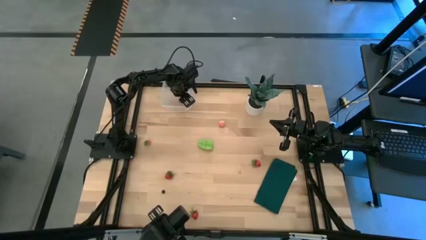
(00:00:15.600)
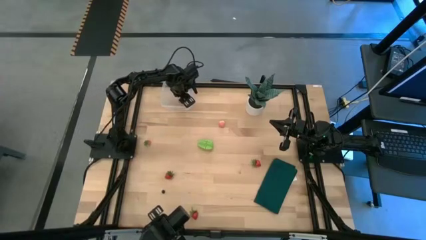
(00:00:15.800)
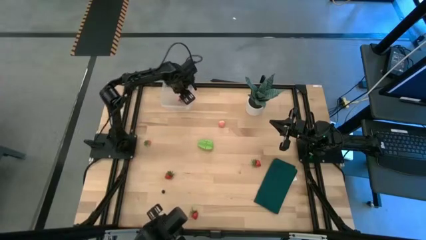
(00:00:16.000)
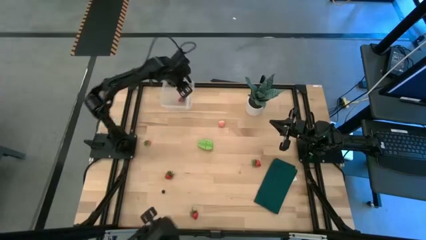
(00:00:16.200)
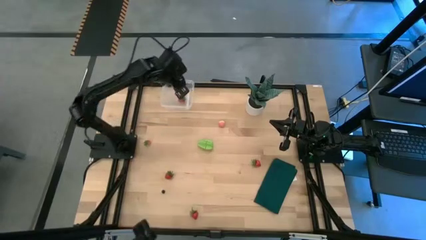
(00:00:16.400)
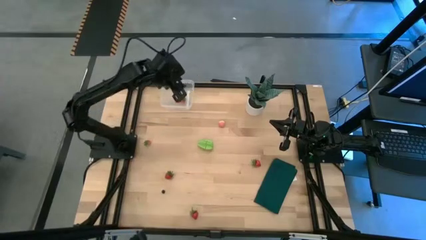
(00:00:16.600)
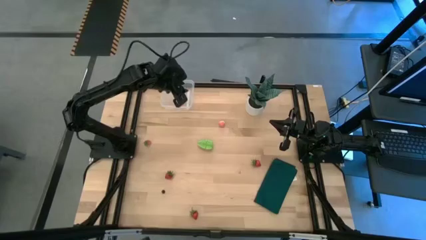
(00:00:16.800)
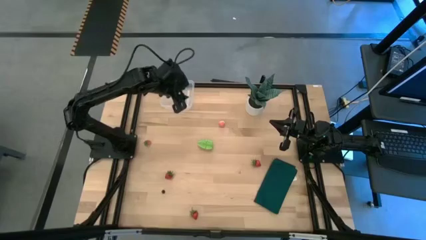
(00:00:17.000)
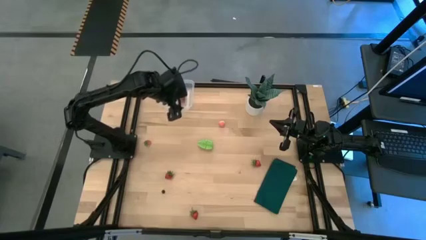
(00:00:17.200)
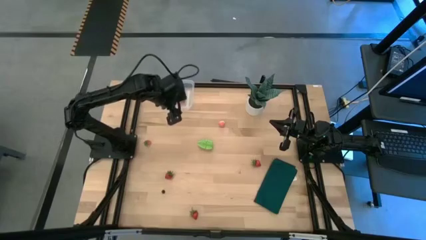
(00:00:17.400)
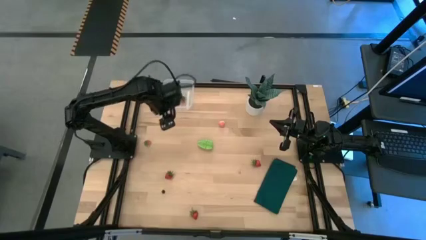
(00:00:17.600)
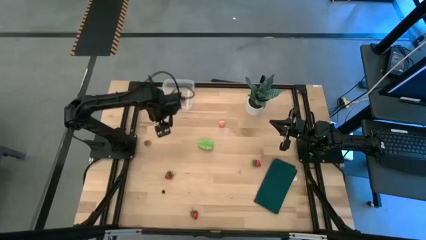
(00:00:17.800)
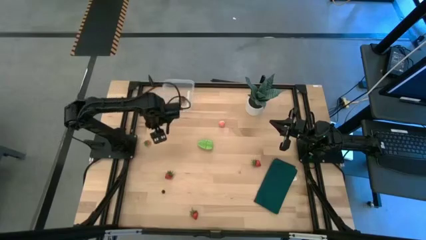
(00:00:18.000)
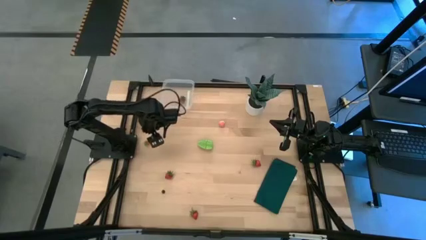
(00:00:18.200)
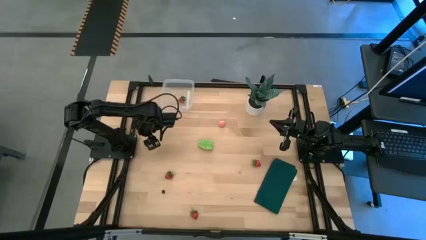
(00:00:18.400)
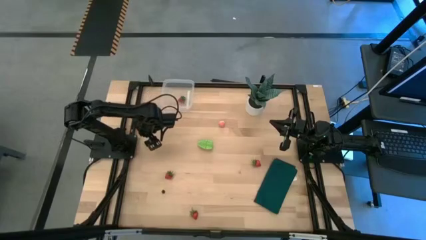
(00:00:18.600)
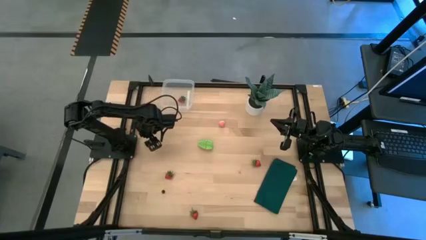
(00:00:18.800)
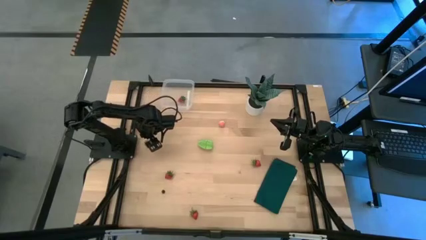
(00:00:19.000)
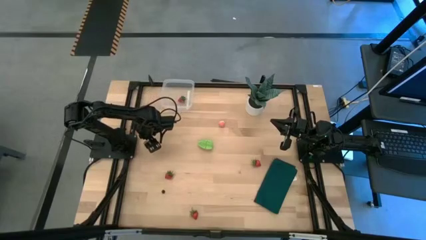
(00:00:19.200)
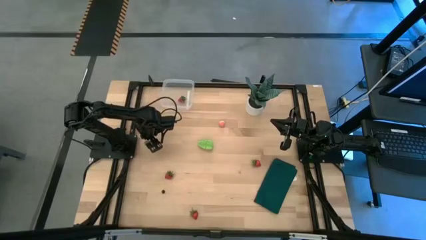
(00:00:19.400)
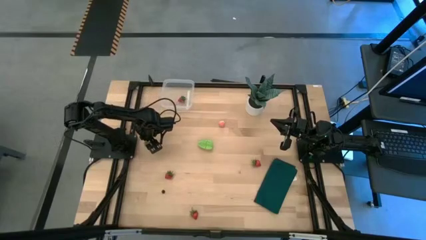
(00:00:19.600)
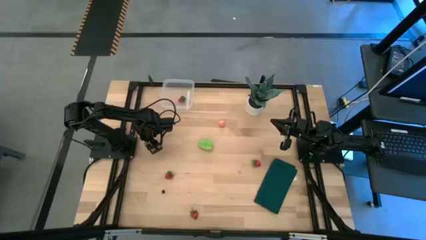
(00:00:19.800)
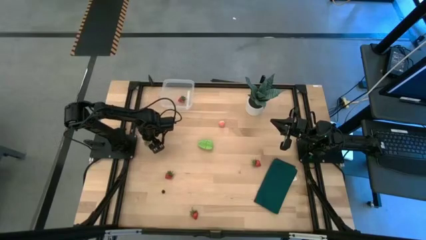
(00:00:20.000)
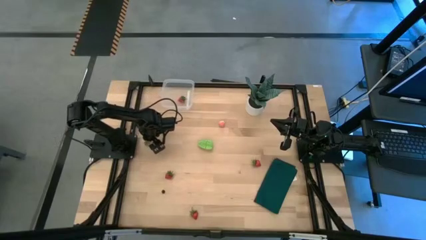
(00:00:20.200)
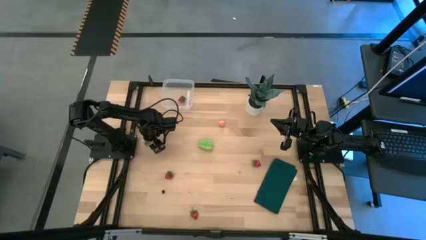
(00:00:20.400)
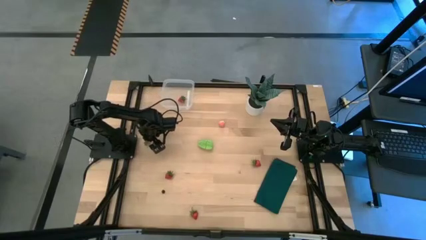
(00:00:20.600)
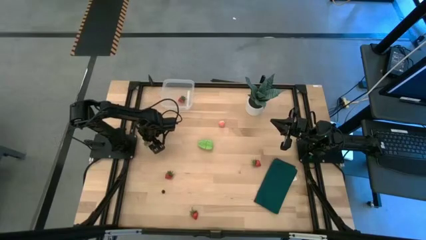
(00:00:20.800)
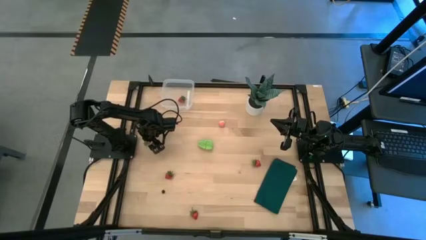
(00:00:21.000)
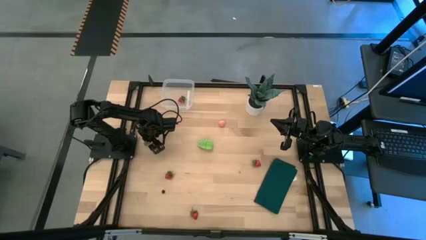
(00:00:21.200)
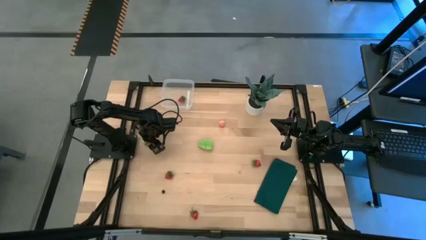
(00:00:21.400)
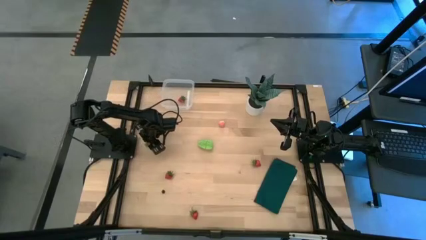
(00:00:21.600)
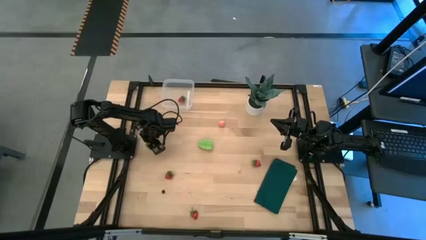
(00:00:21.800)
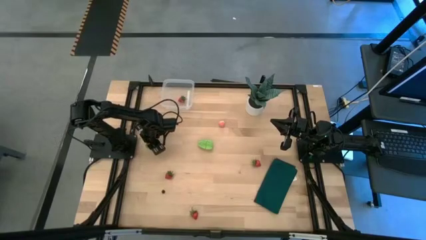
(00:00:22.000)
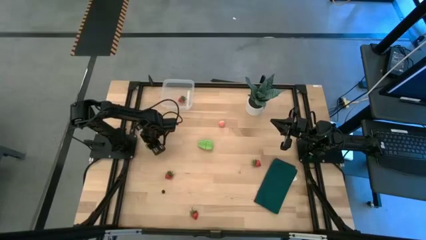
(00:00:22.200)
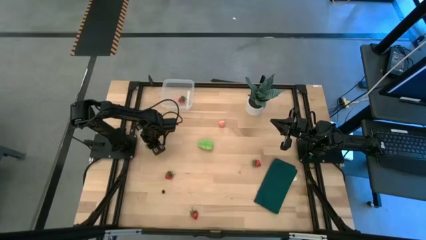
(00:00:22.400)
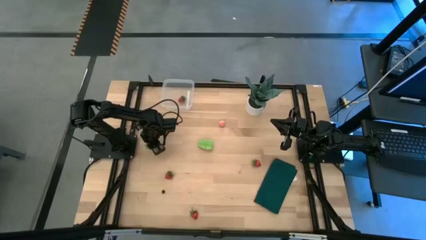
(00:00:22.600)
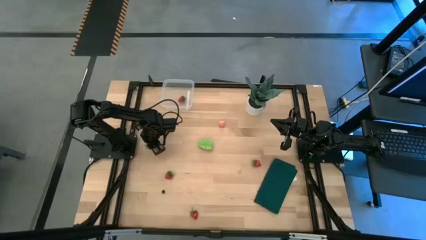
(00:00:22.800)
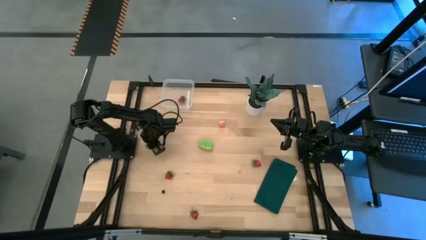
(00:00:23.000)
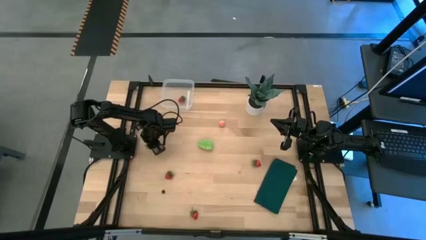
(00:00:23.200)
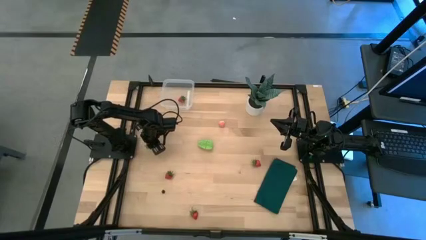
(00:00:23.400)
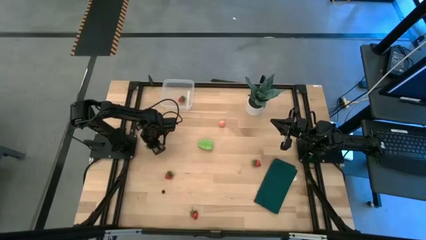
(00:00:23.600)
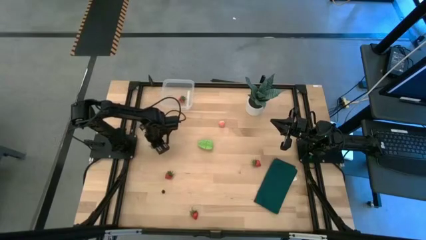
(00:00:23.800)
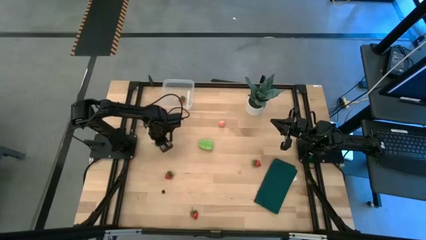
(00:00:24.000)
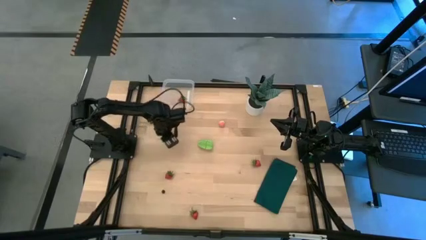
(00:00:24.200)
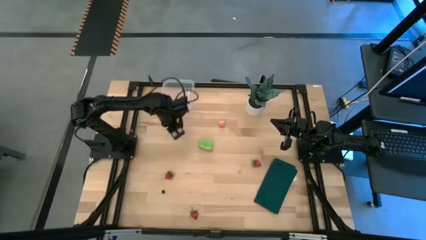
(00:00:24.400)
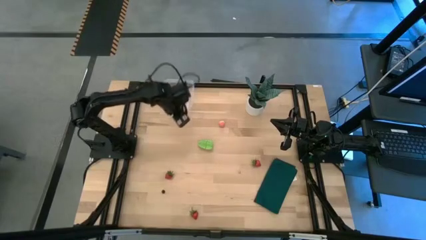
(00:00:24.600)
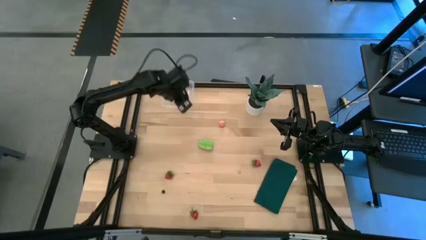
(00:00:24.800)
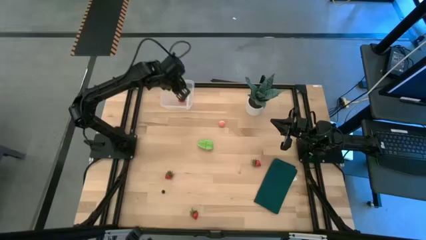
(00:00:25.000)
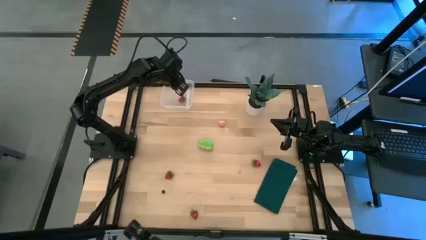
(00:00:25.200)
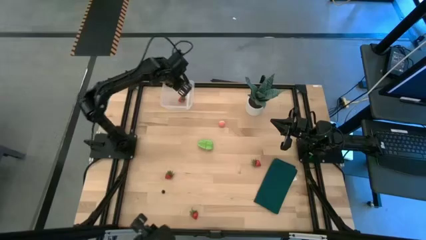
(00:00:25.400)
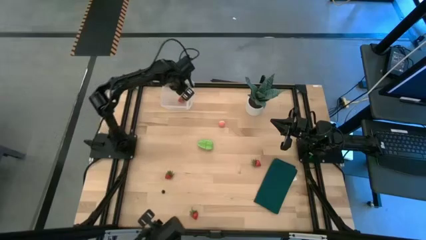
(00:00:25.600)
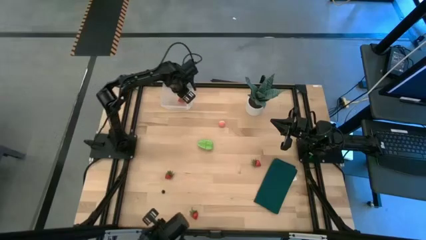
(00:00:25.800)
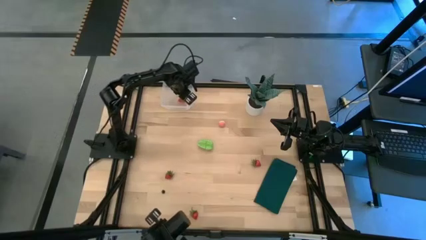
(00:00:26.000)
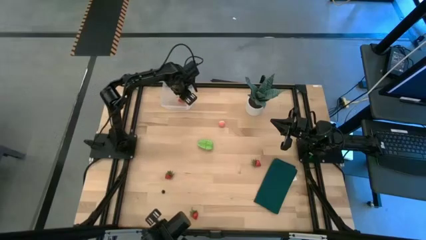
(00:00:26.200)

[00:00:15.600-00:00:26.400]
Task: Pick and placing Produce into tupperware
Put the red strawberry into the transparent container
